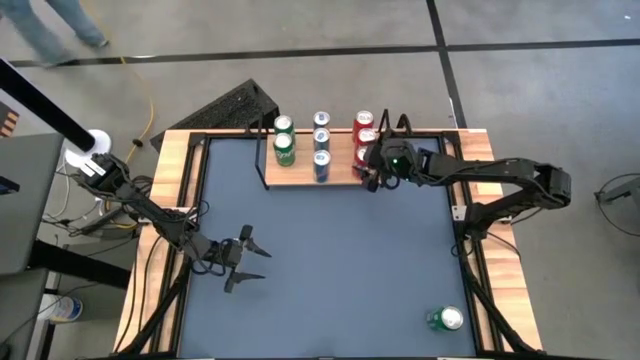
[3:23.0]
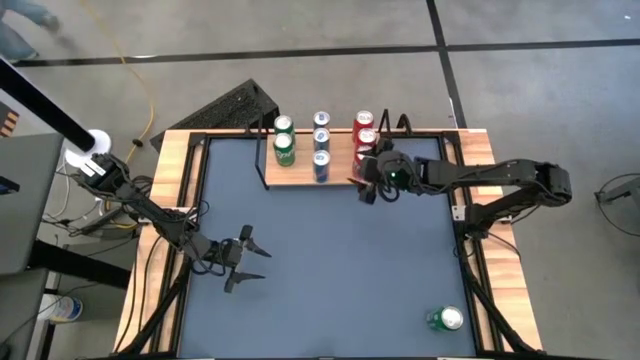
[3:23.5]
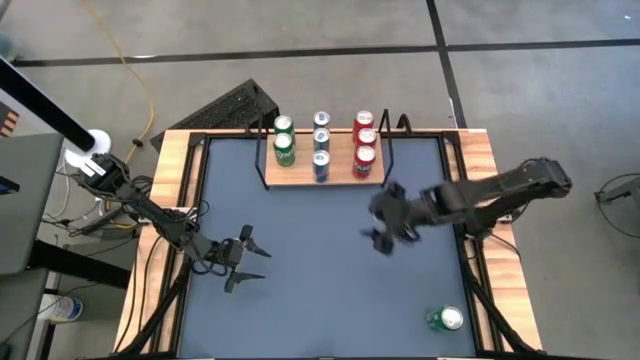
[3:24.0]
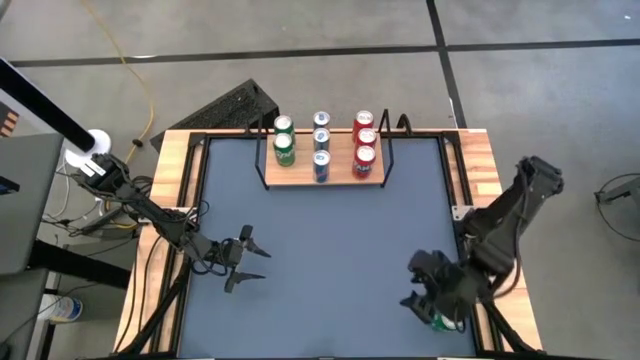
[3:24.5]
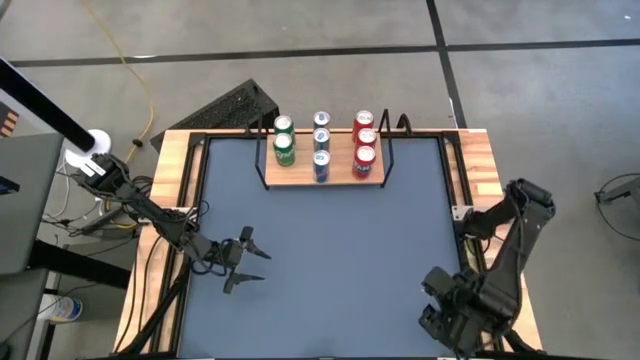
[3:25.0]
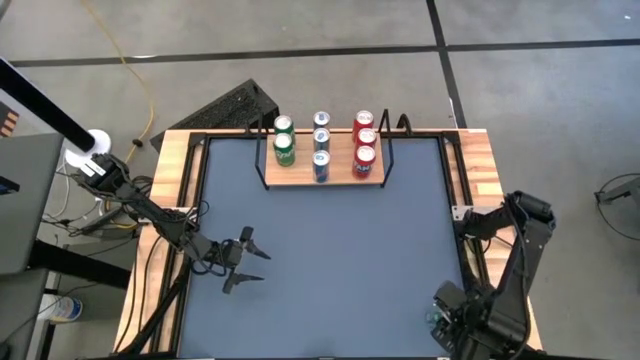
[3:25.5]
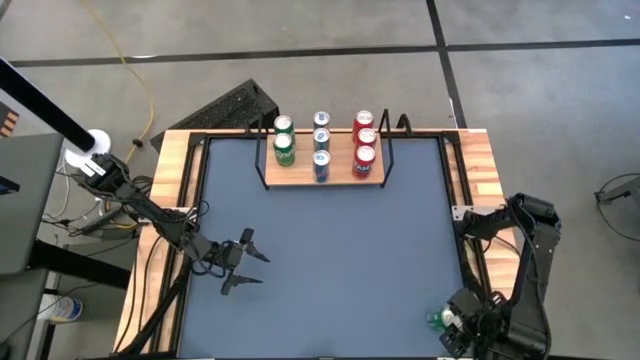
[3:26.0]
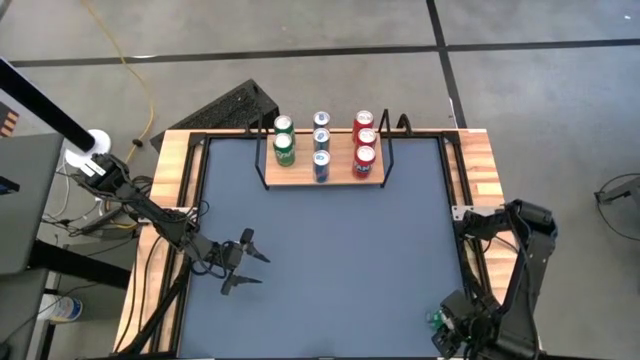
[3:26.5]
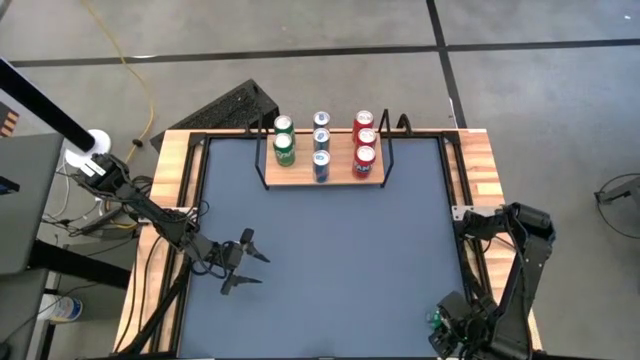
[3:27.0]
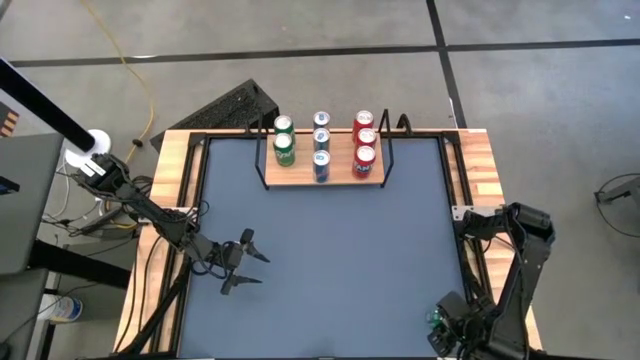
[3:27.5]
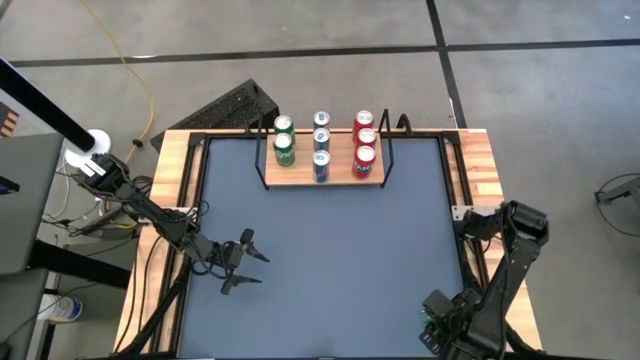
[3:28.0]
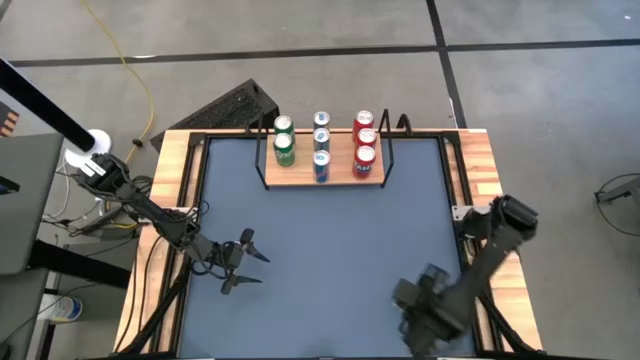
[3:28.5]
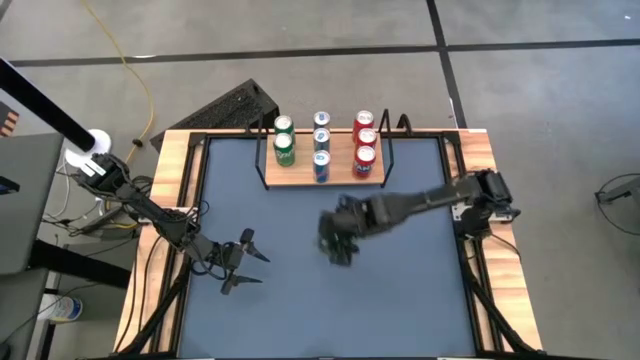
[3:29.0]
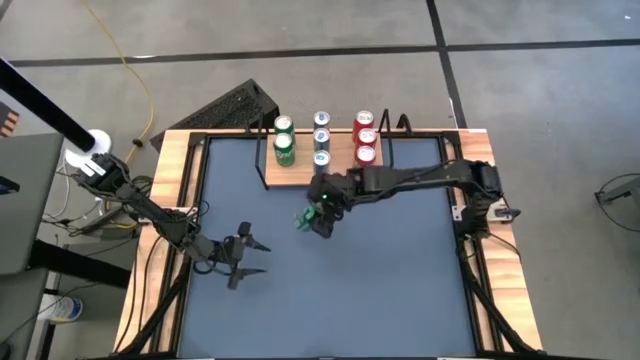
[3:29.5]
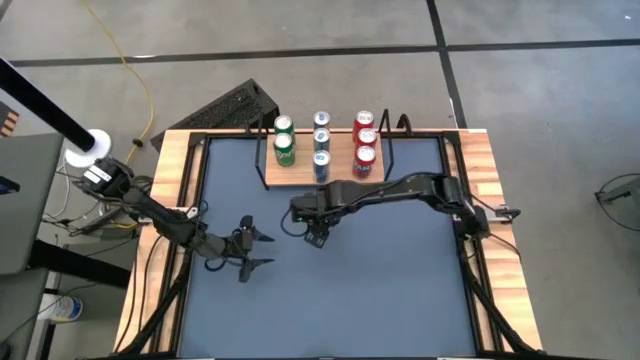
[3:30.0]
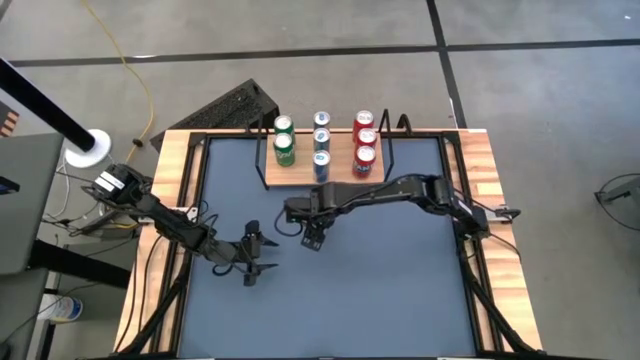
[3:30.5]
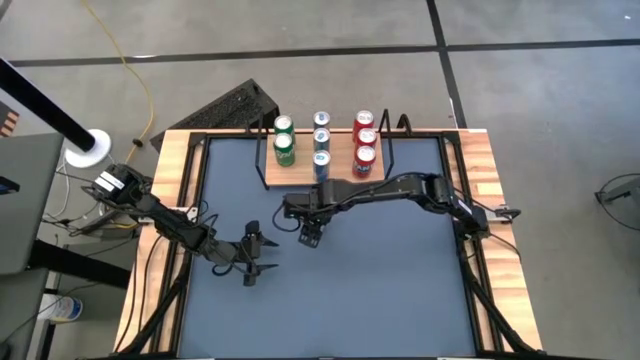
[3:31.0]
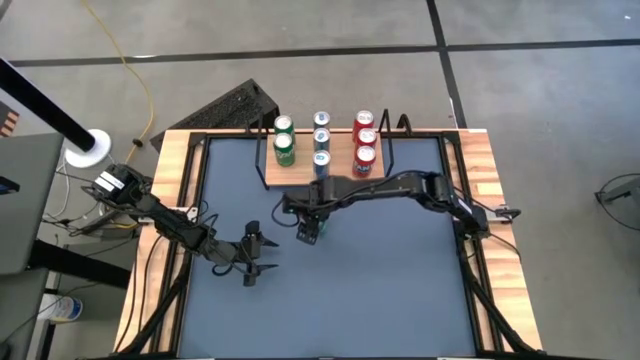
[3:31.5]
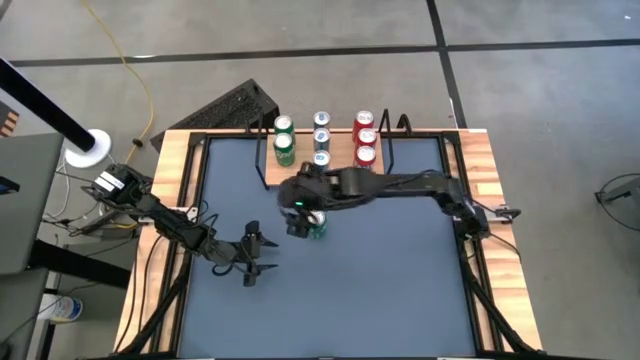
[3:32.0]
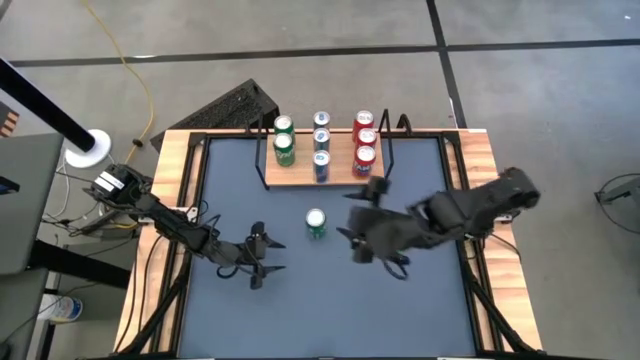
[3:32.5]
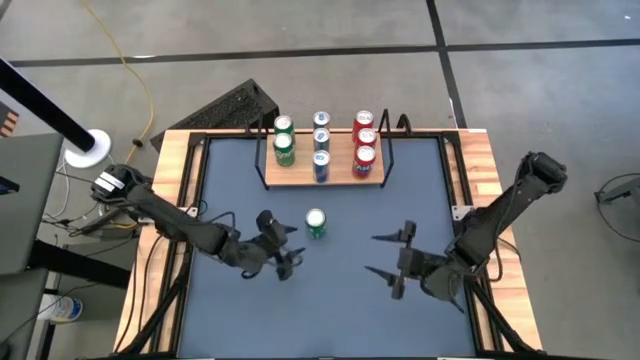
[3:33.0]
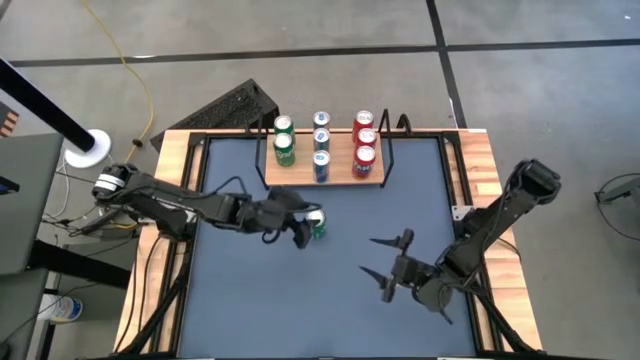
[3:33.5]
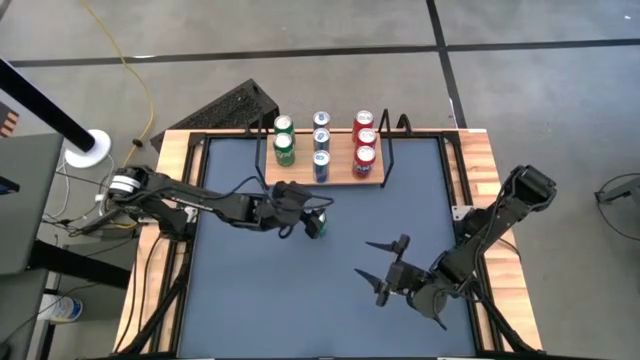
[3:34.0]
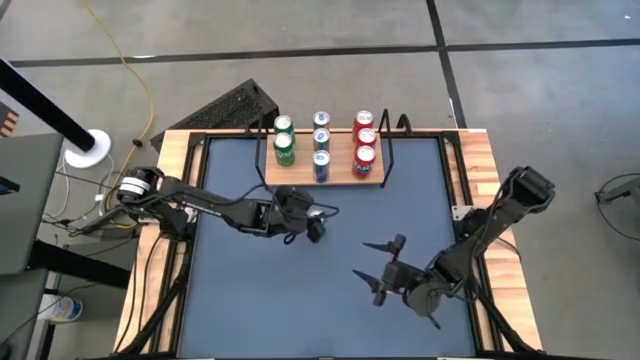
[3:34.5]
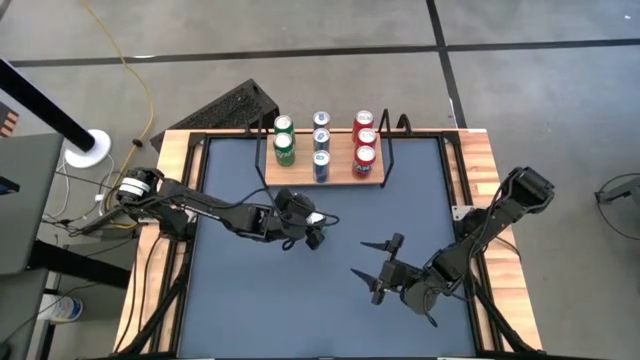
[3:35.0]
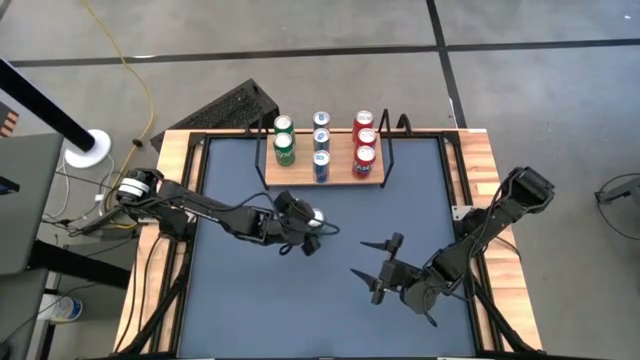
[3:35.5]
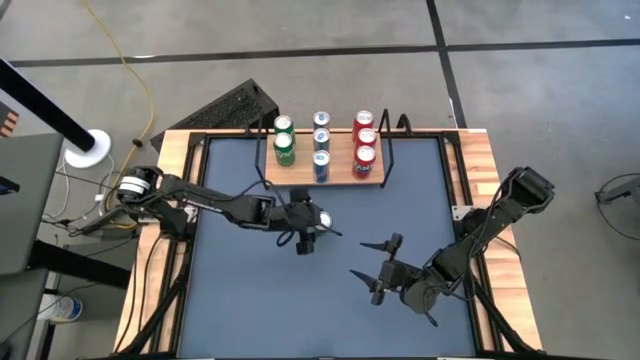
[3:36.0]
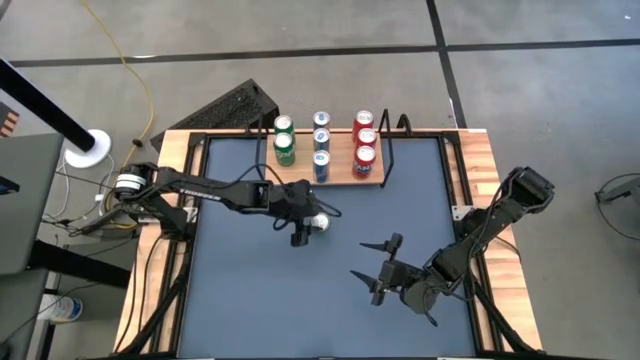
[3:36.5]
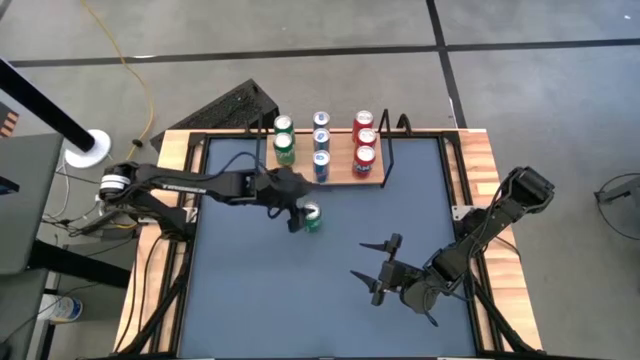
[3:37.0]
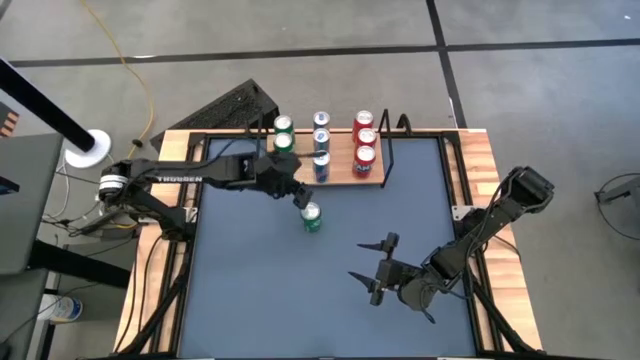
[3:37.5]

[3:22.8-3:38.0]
Task: Place canned beverage on shelf
Put the green soda can on the shelf aligned with the other green soda cans

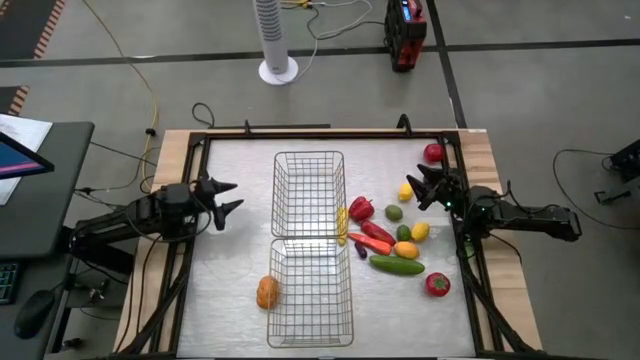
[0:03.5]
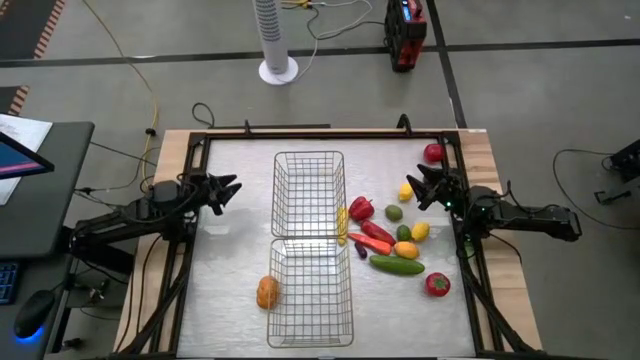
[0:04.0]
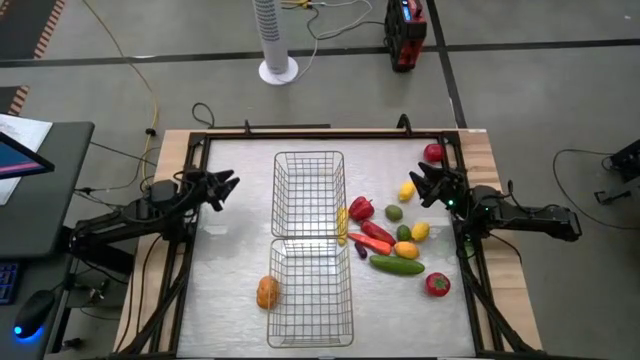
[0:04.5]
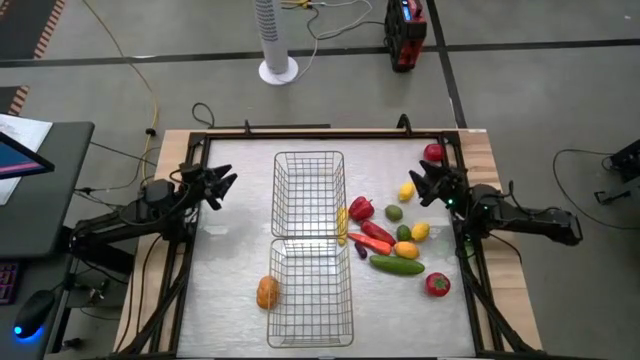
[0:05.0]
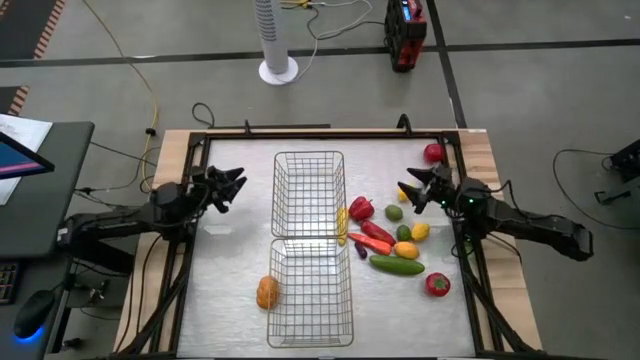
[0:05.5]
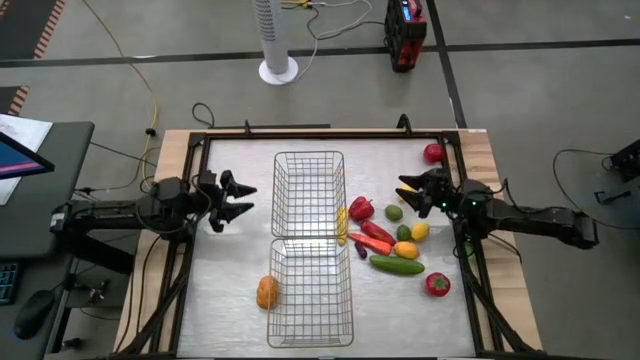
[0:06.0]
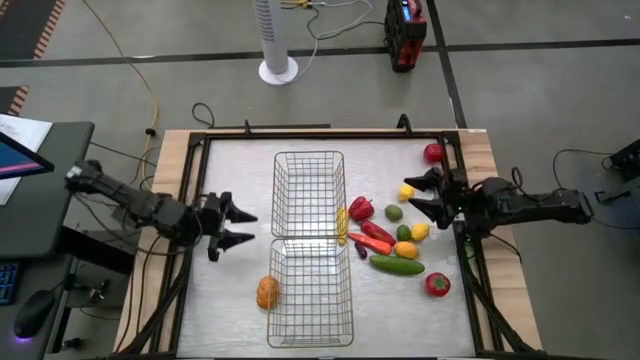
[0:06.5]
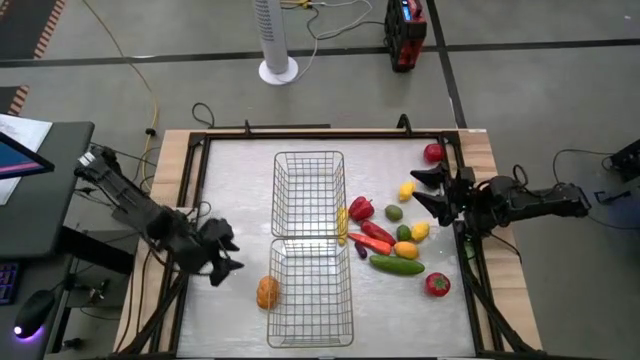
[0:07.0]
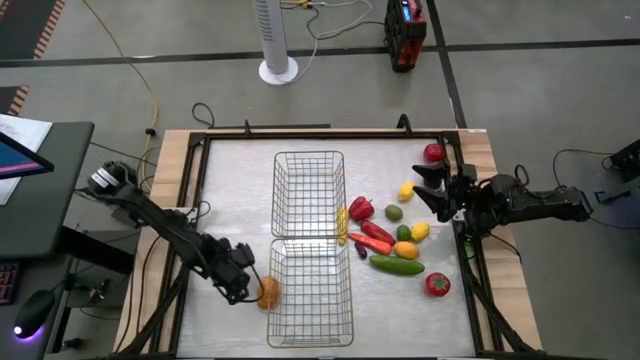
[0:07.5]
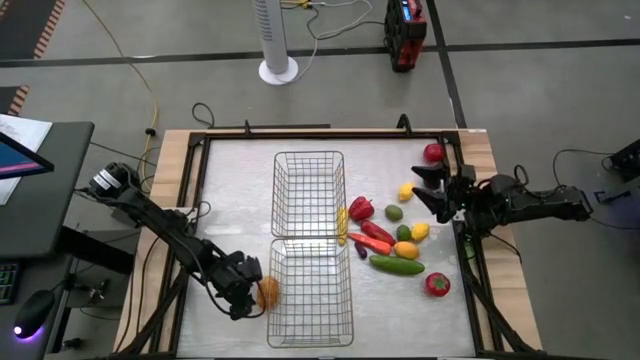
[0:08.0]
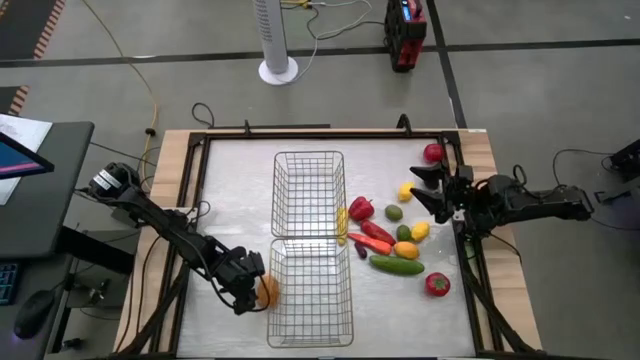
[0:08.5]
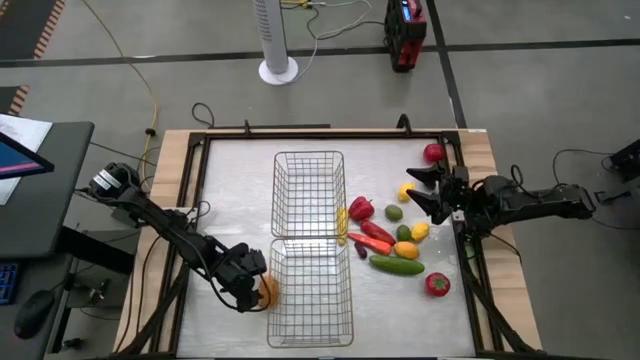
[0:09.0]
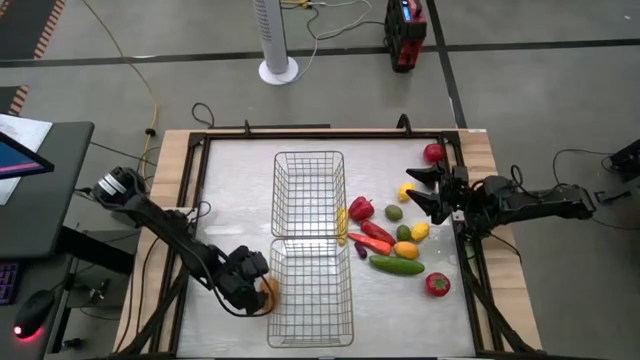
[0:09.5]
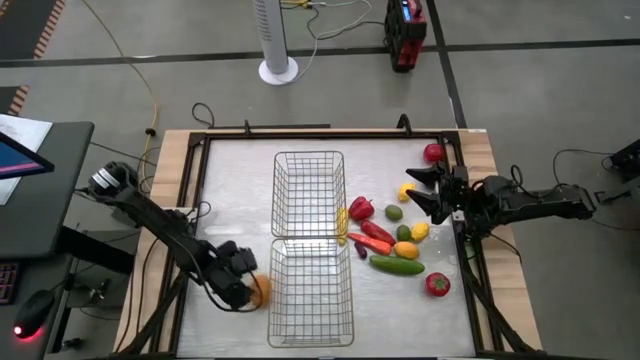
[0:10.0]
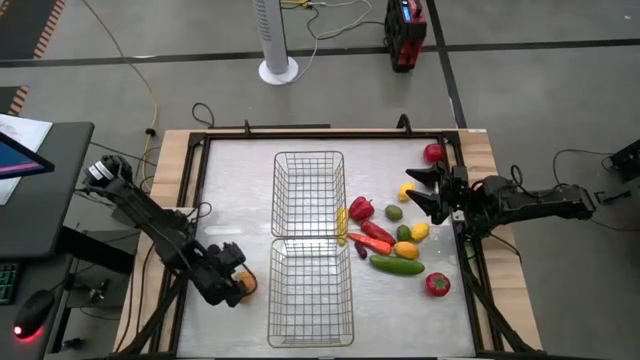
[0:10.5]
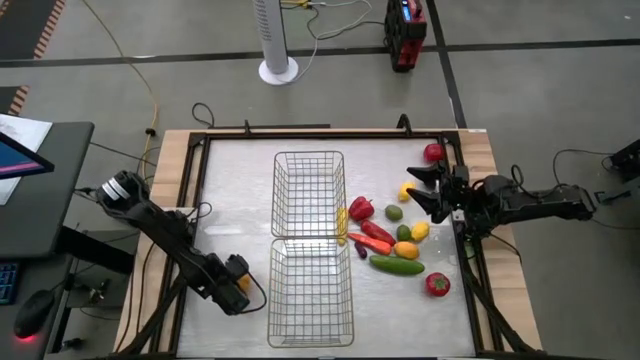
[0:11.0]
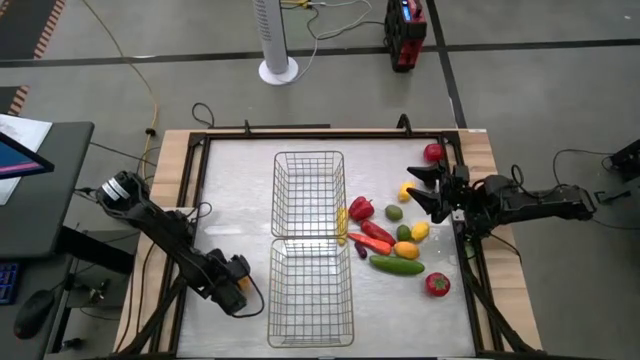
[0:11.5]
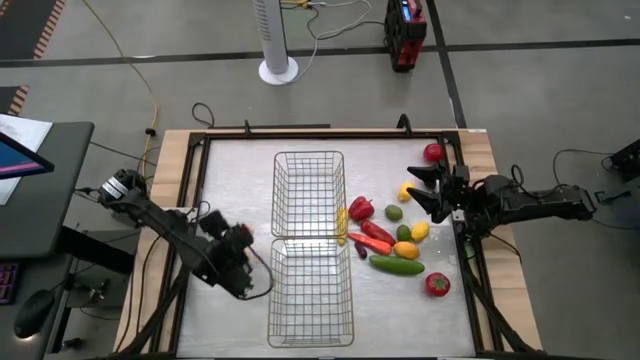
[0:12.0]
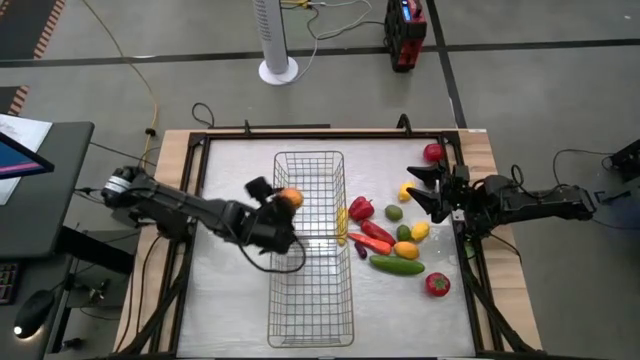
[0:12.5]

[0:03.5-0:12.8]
Task: Sort produce into baskets
Put the potato into the top wire basket
